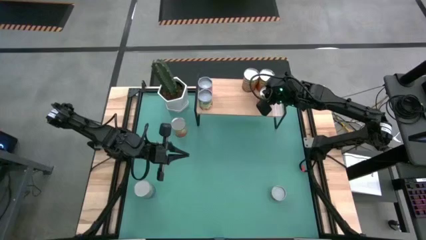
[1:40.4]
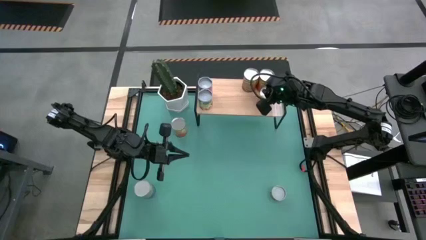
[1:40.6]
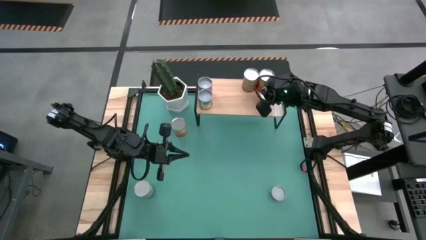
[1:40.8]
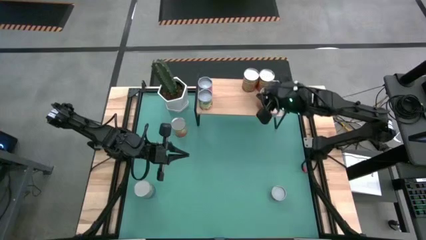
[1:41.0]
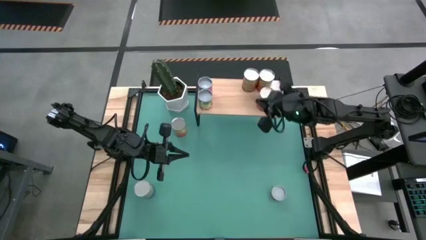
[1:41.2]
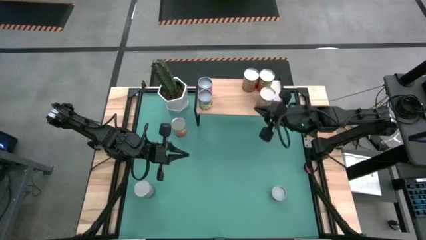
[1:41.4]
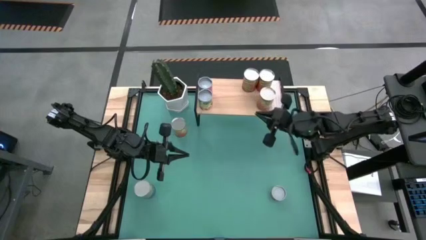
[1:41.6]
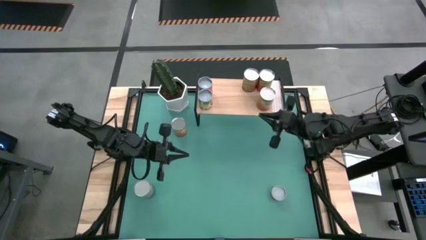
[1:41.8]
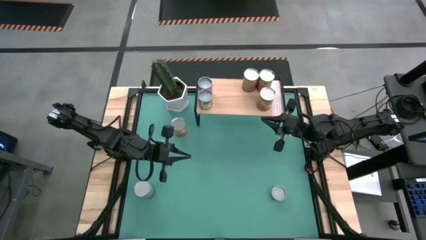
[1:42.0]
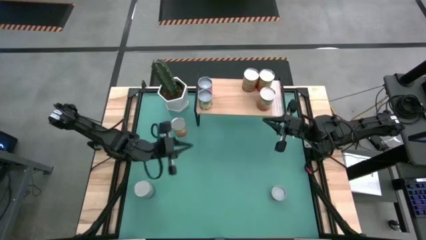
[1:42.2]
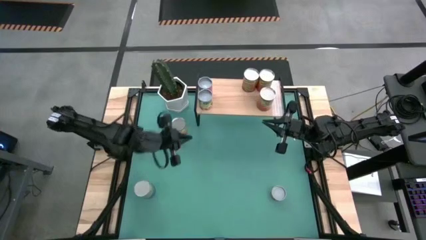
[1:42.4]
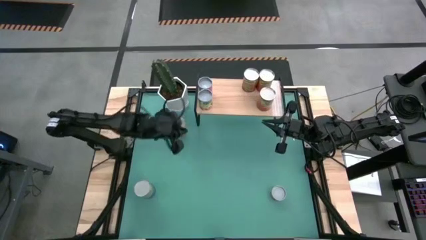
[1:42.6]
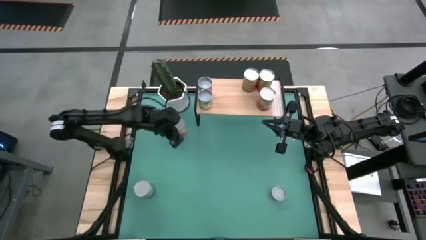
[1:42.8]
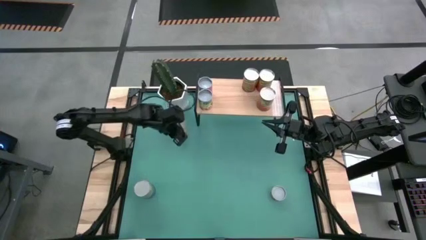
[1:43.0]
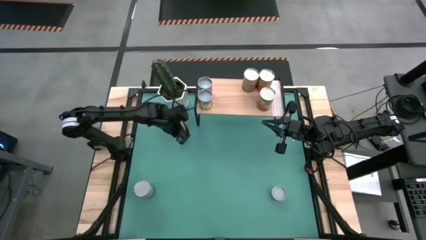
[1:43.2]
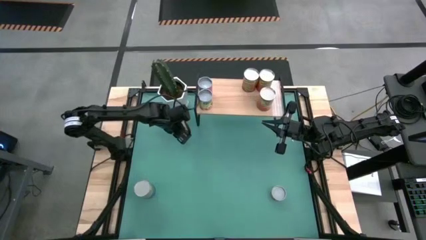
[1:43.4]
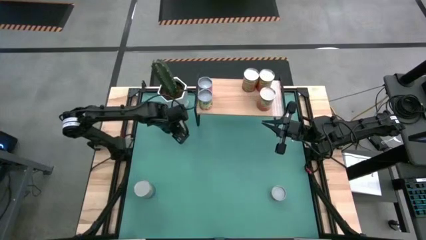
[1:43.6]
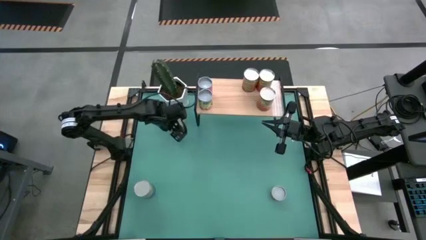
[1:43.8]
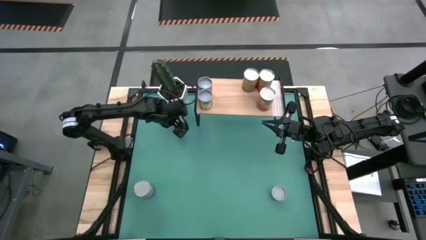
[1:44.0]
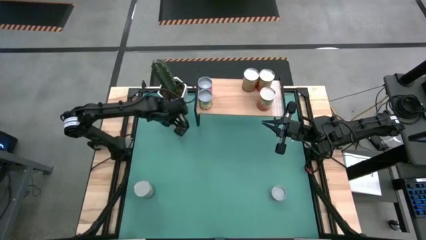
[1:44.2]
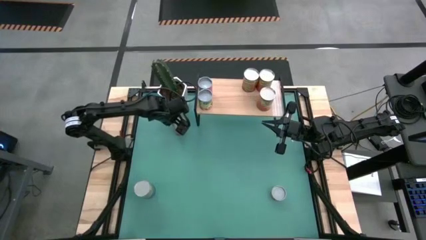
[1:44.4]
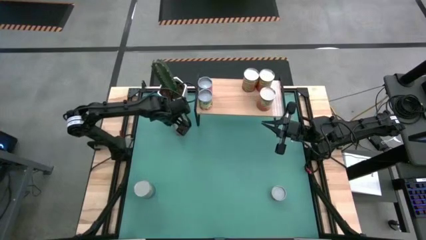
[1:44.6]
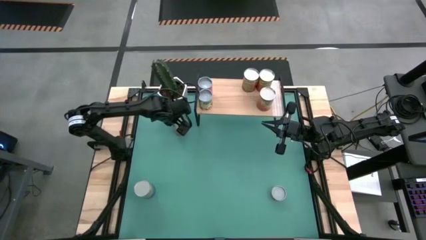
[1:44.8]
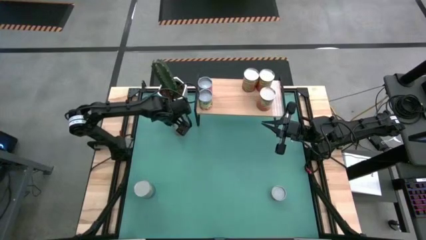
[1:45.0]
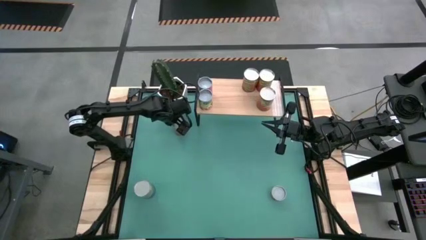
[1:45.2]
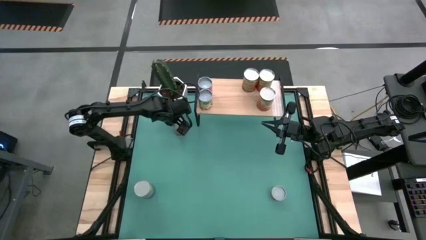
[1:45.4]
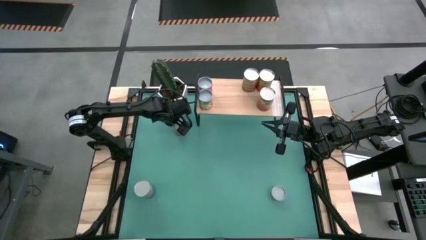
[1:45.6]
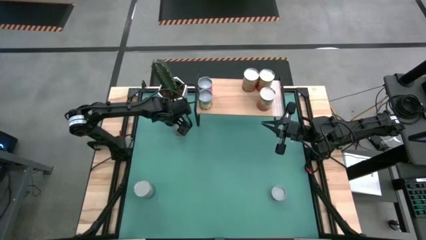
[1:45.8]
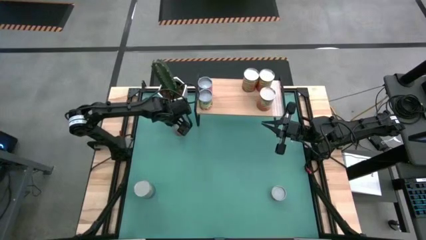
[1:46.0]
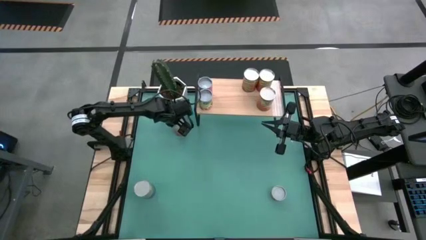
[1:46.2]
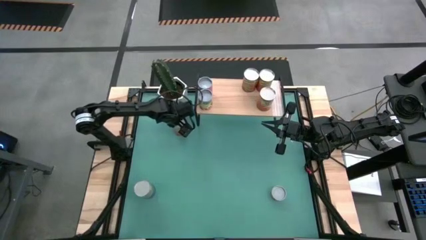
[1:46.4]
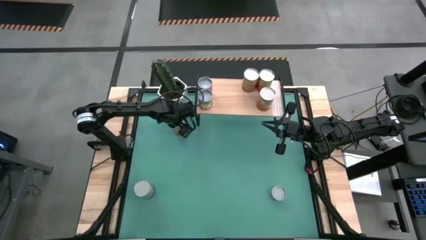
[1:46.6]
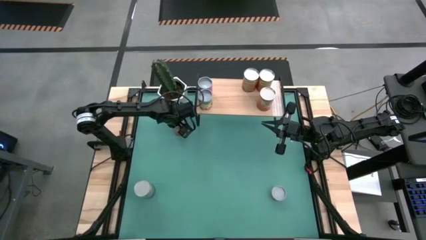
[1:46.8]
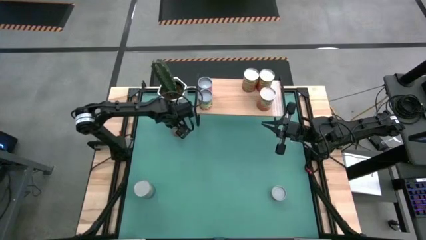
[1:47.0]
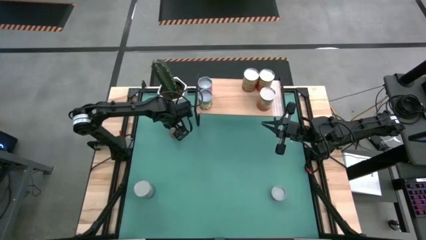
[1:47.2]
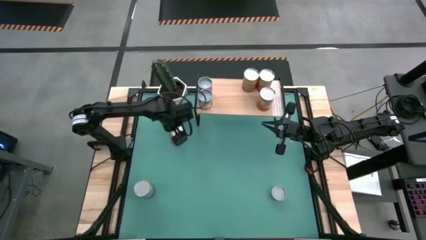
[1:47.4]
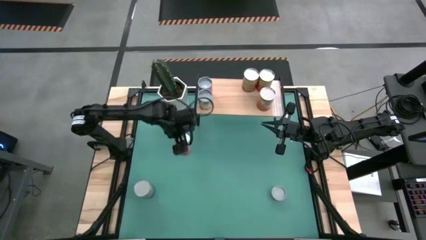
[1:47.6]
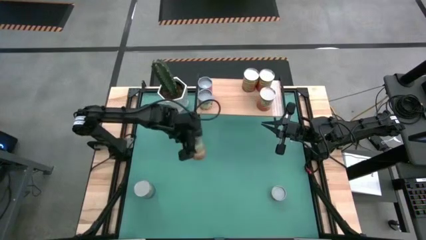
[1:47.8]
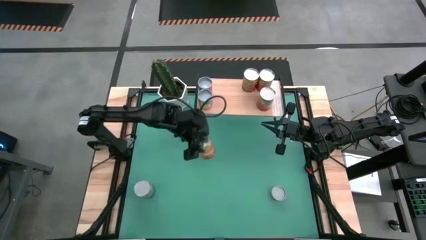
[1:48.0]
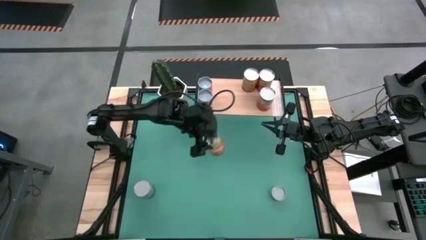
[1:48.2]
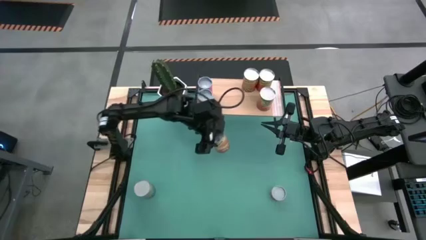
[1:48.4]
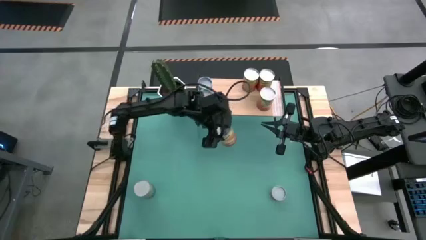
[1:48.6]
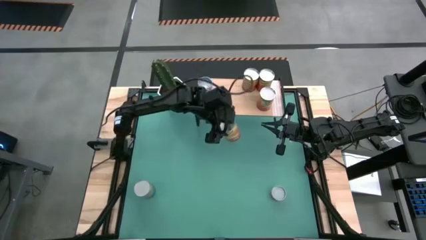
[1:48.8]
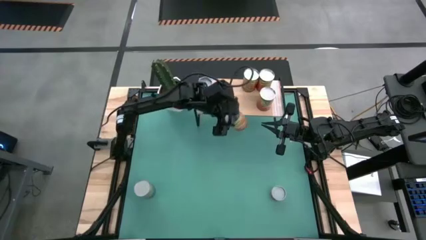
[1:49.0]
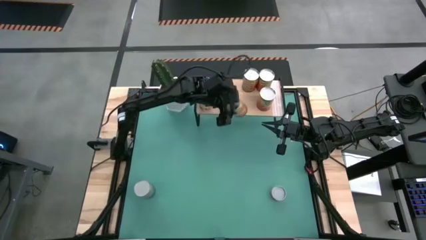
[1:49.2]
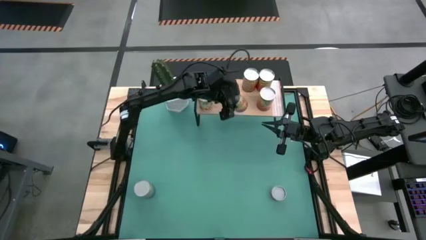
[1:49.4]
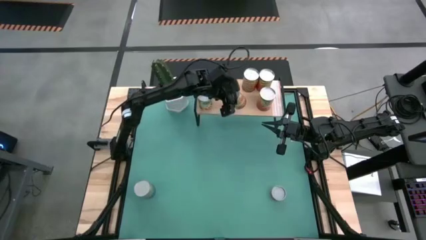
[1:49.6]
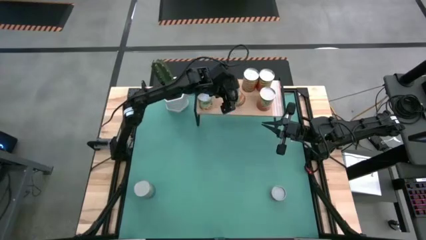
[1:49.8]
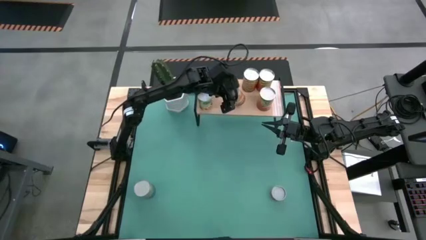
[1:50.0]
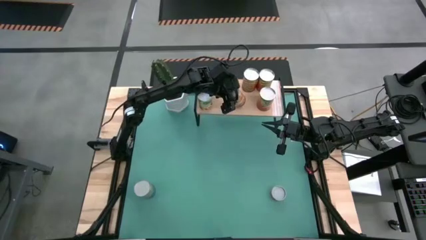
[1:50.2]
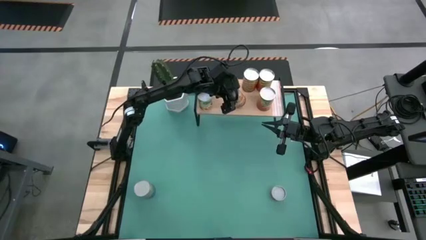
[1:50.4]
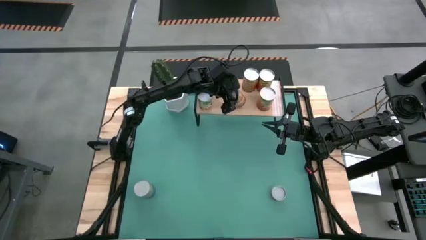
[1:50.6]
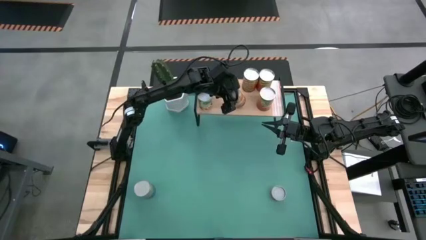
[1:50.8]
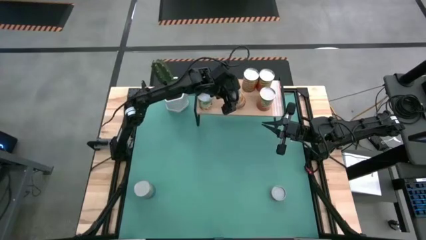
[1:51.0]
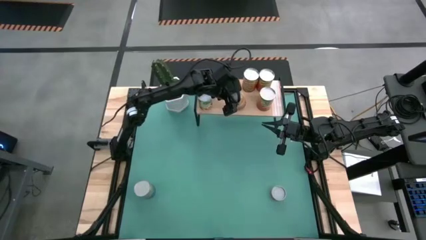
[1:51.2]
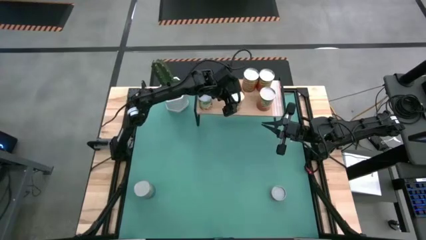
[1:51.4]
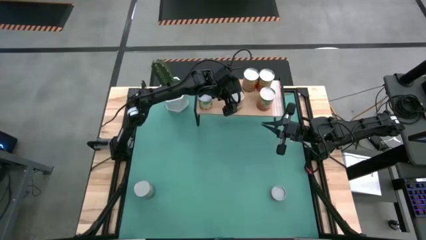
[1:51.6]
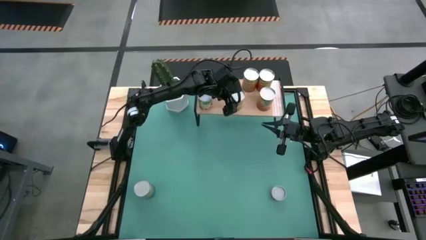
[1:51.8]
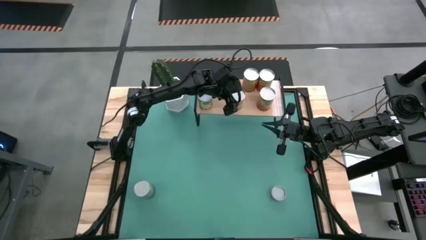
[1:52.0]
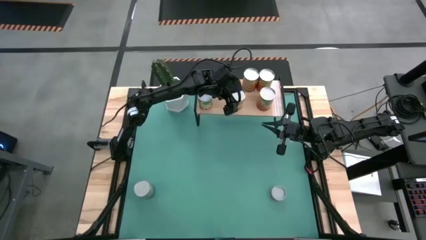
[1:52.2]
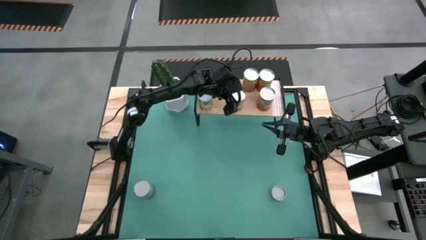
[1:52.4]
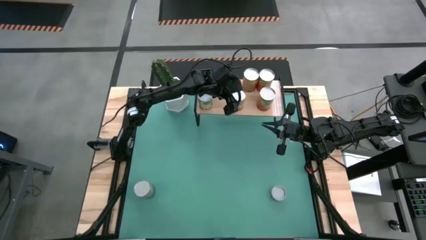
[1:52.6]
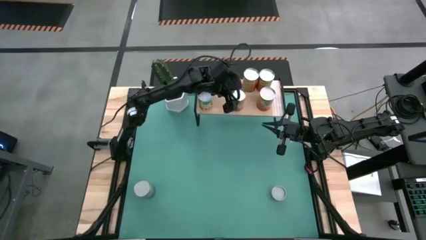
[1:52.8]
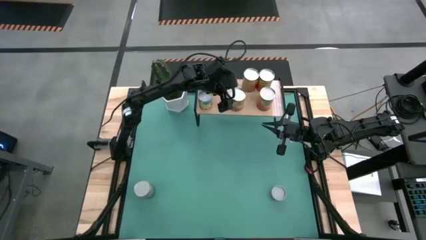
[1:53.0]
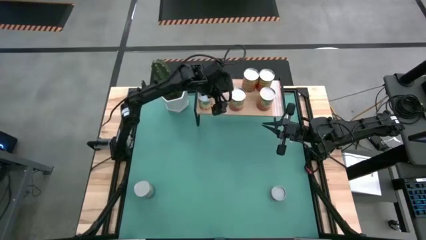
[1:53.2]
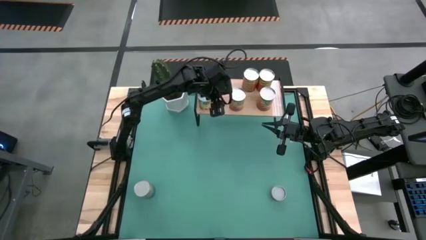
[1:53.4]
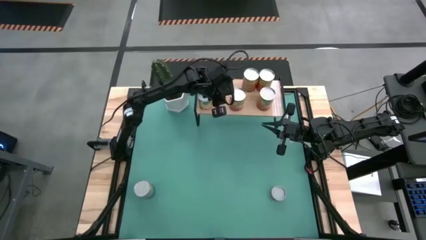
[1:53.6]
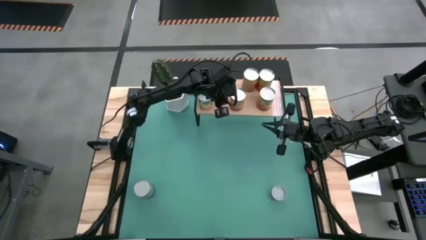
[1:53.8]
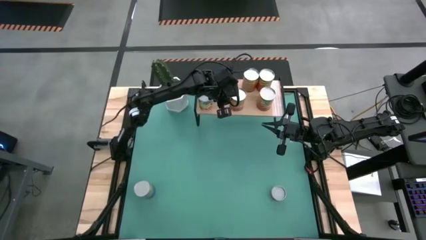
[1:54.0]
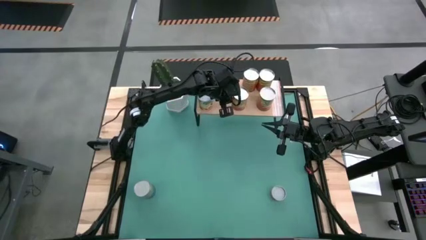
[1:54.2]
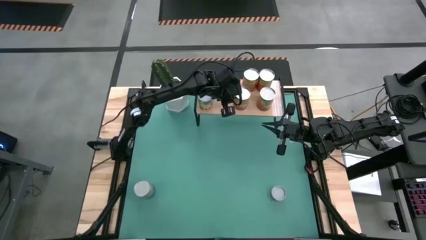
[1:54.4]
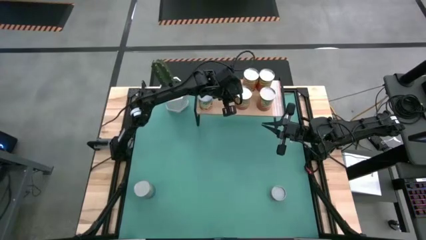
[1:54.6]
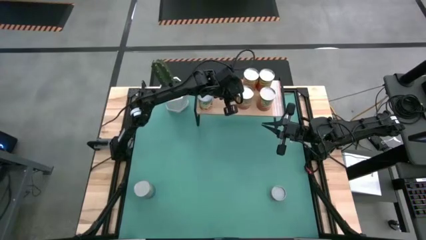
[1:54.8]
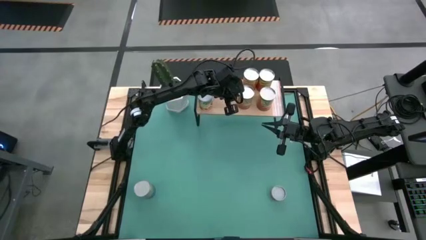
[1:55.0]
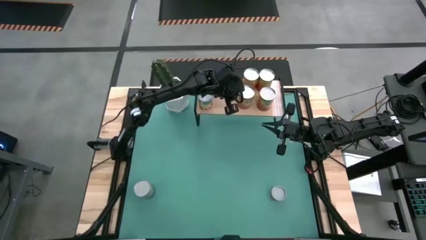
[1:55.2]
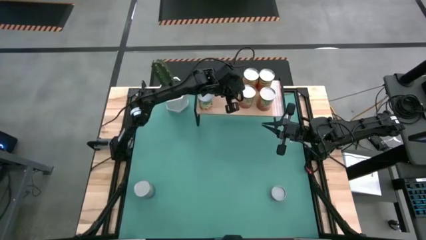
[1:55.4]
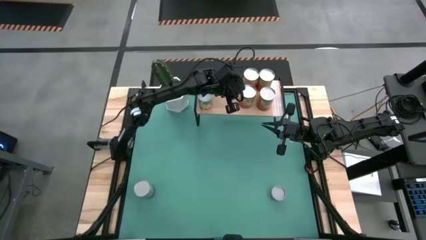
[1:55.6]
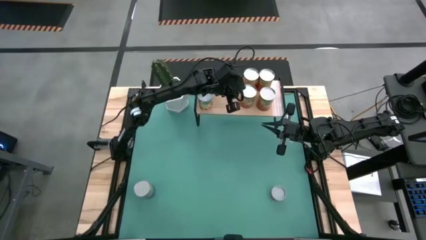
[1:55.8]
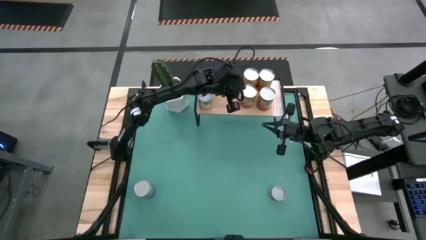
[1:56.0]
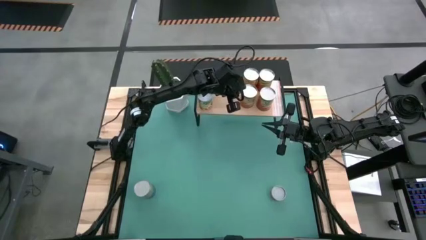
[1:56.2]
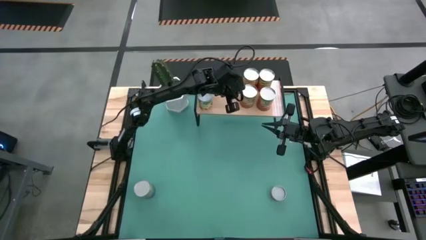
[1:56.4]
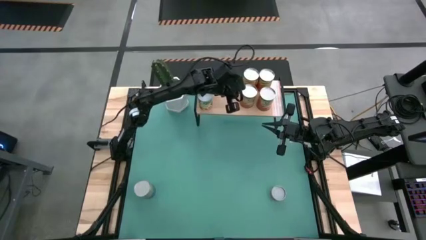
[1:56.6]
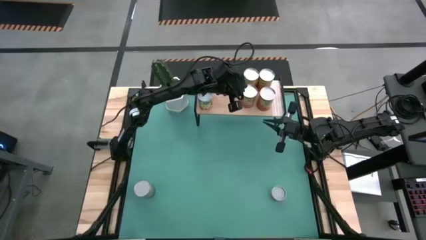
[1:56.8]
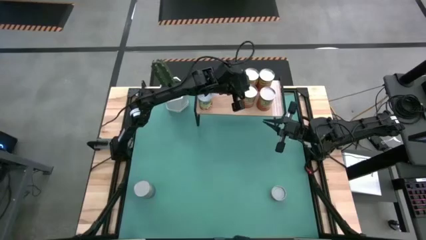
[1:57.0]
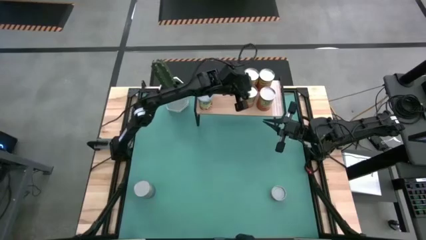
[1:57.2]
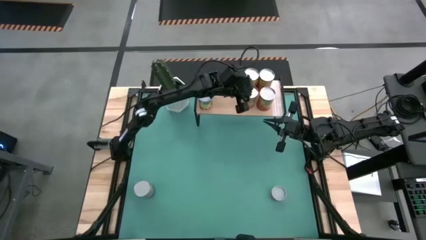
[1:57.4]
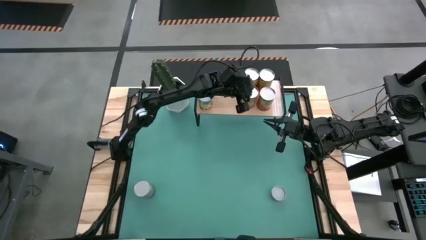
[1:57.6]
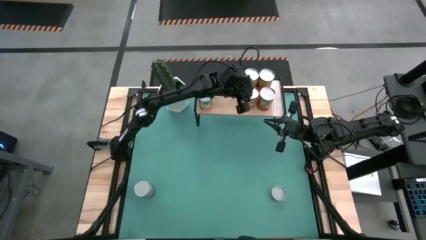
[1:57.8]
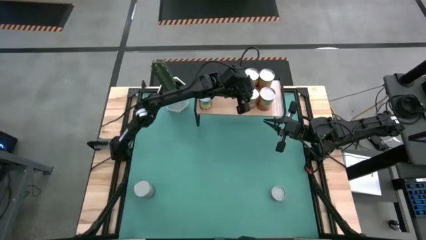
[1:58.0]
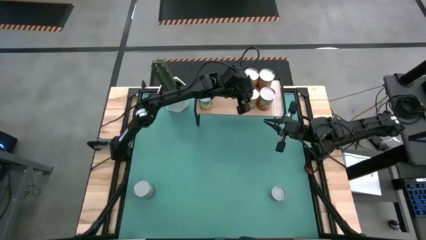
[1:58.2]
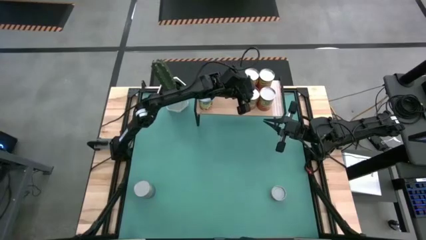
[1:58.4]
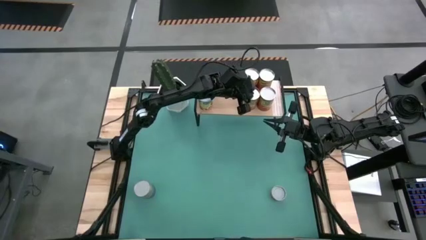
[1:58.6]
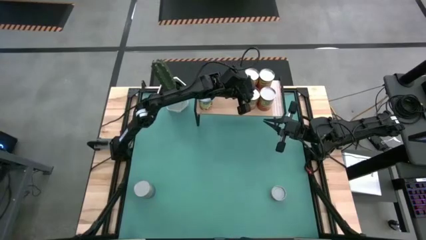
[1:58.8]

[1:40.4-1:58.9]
Task: Pick and place cans onto a shelf
Put the canned corn on the shelf
